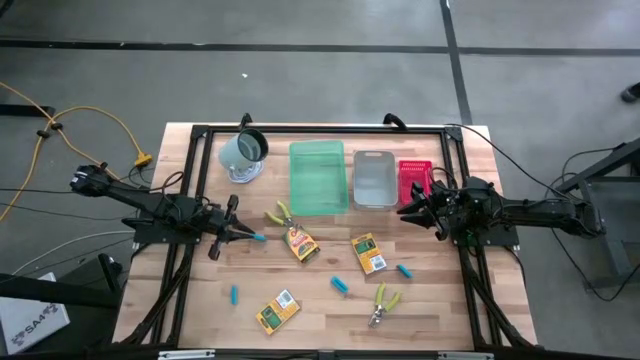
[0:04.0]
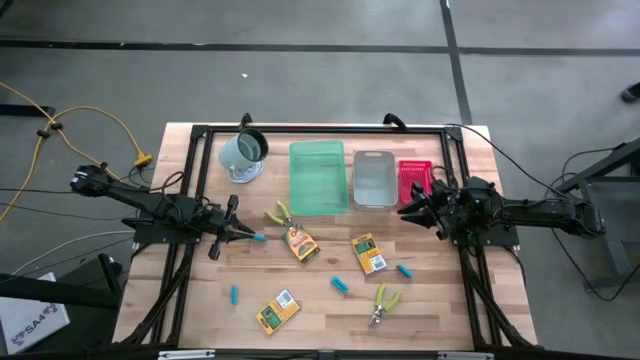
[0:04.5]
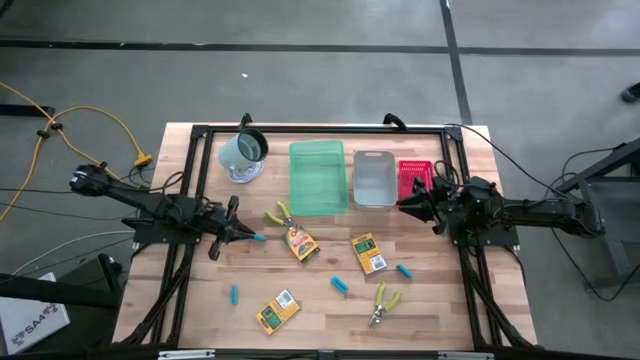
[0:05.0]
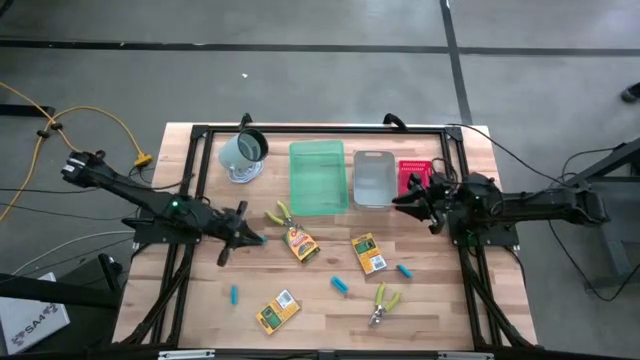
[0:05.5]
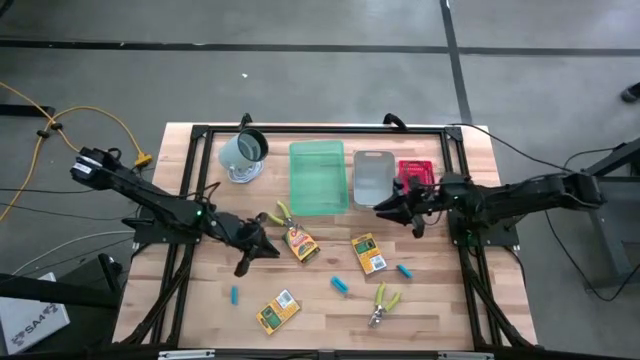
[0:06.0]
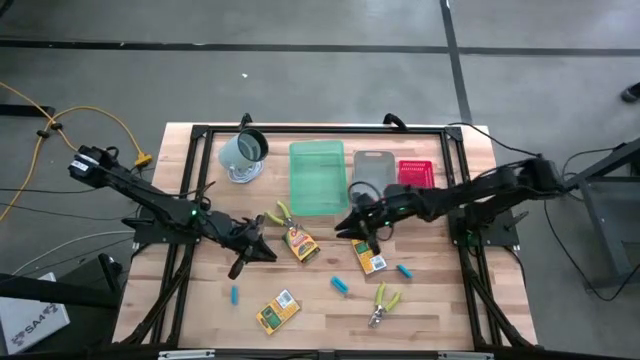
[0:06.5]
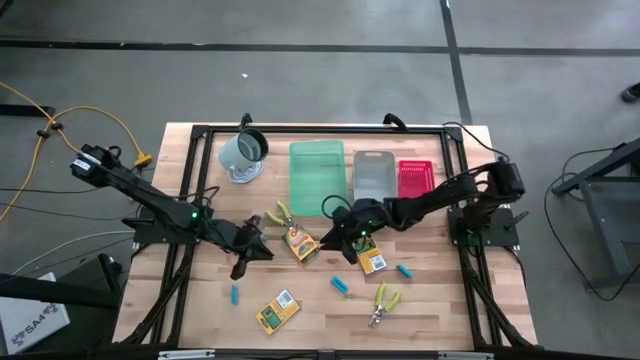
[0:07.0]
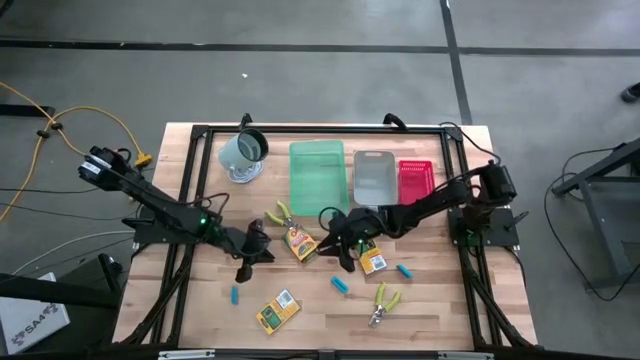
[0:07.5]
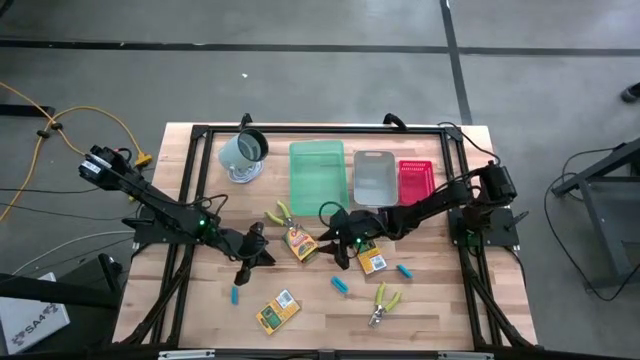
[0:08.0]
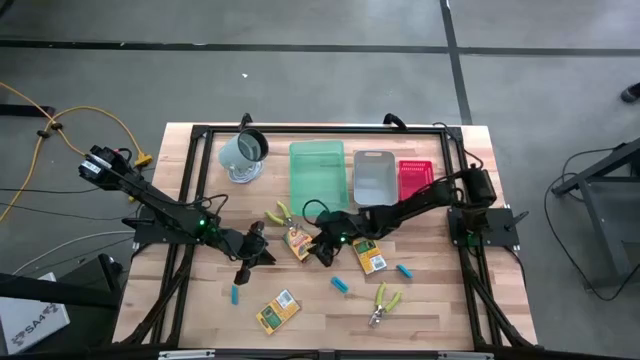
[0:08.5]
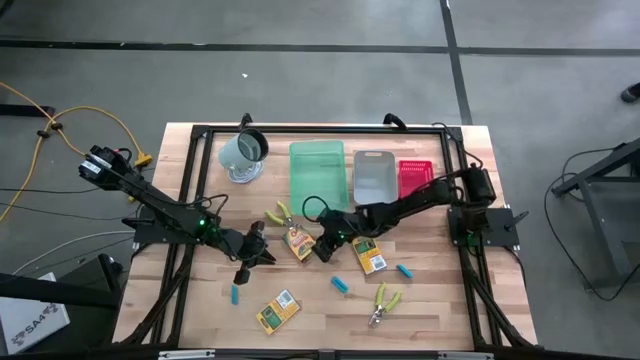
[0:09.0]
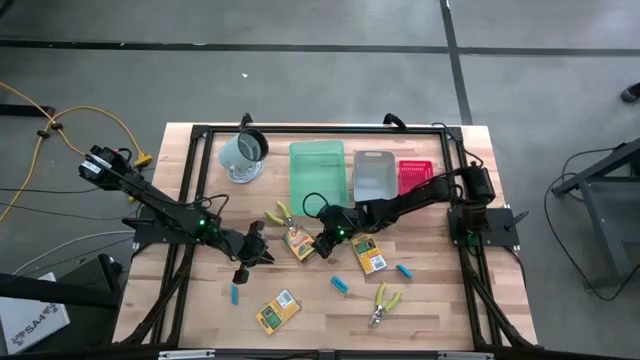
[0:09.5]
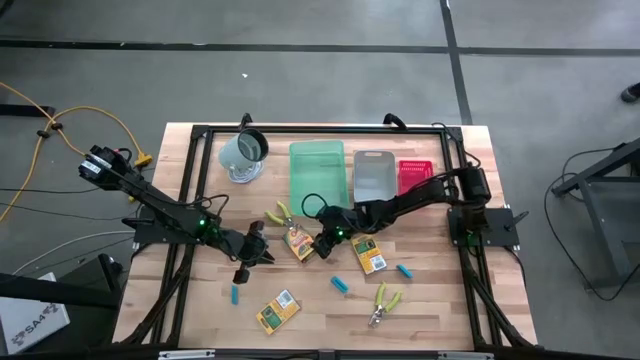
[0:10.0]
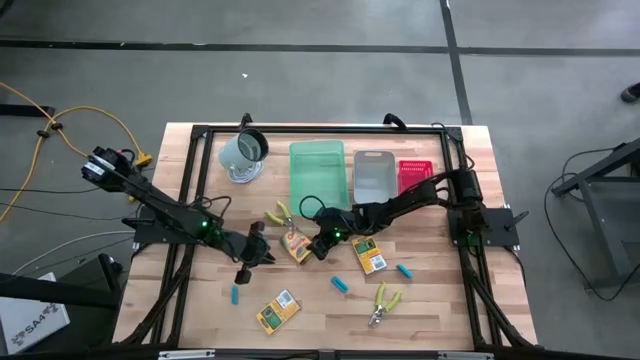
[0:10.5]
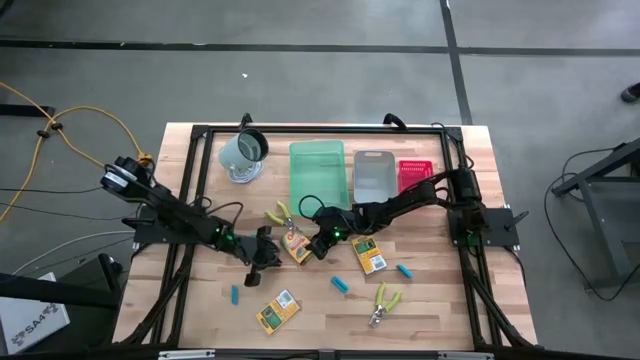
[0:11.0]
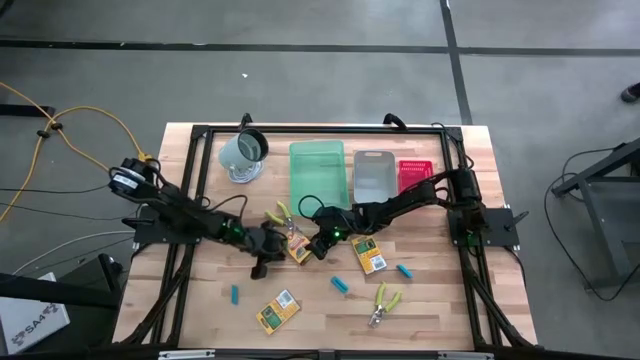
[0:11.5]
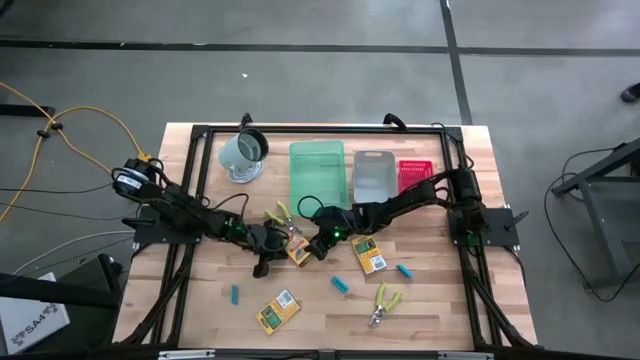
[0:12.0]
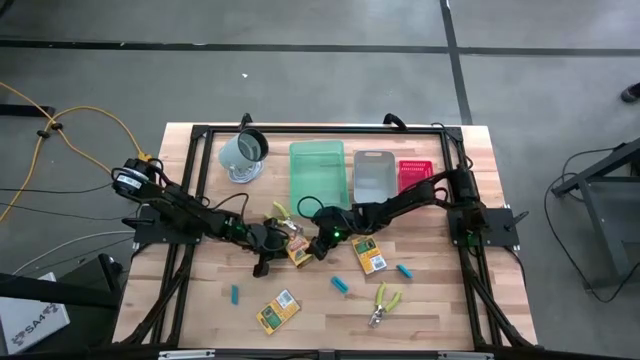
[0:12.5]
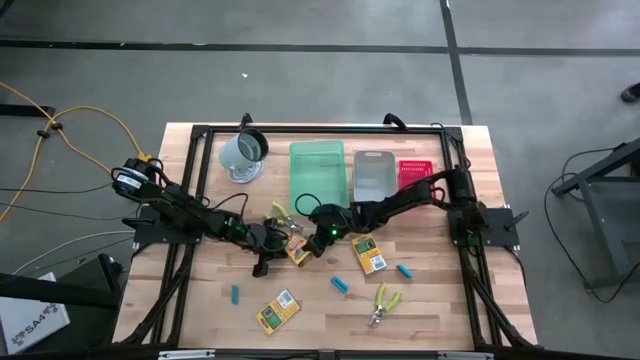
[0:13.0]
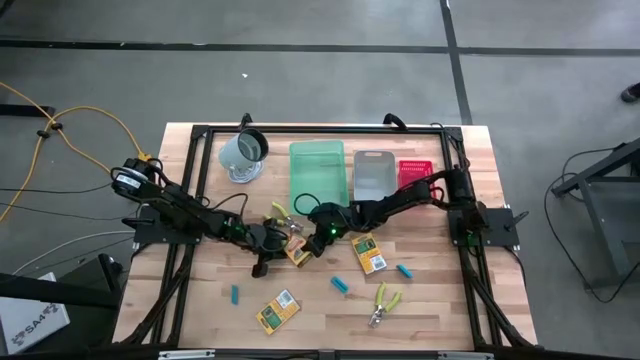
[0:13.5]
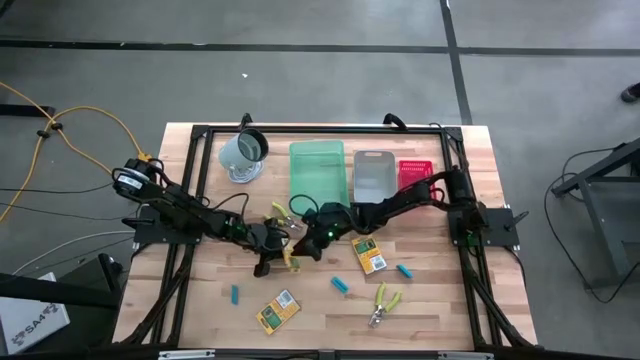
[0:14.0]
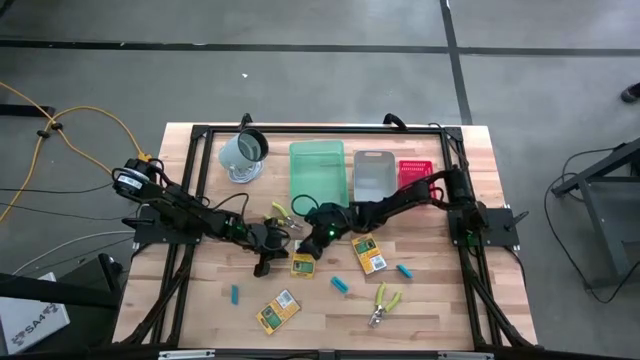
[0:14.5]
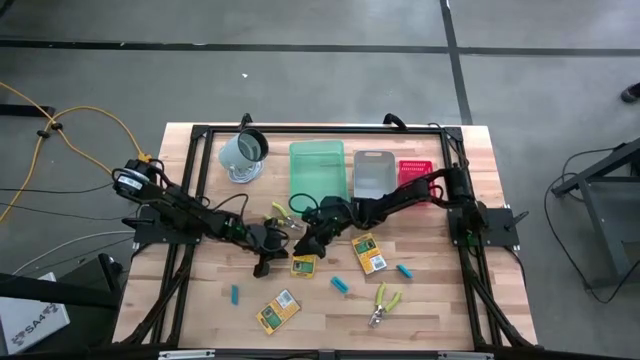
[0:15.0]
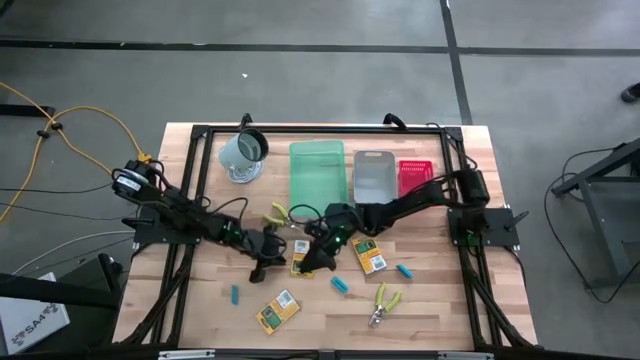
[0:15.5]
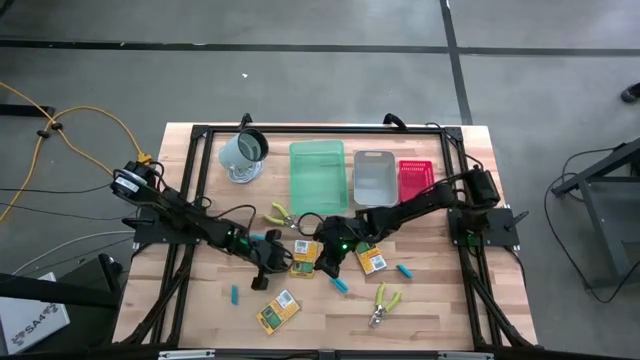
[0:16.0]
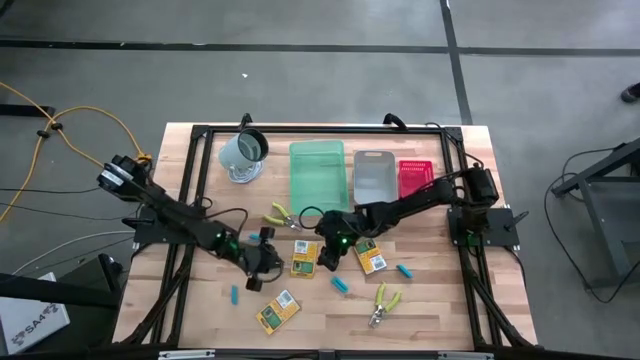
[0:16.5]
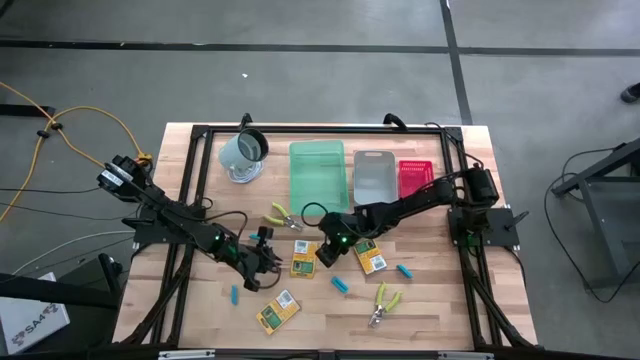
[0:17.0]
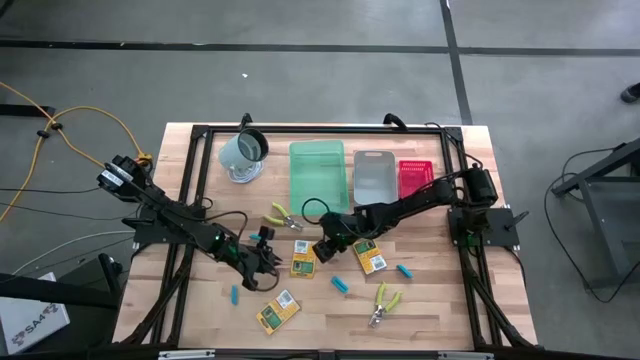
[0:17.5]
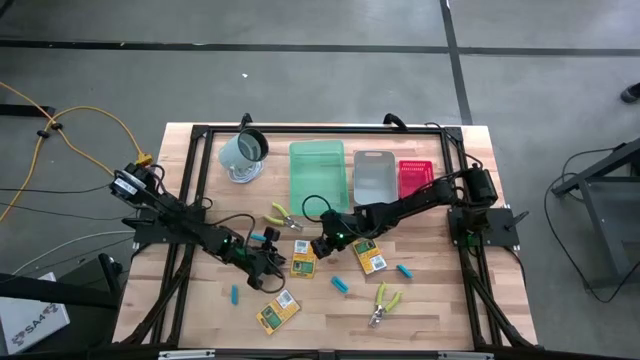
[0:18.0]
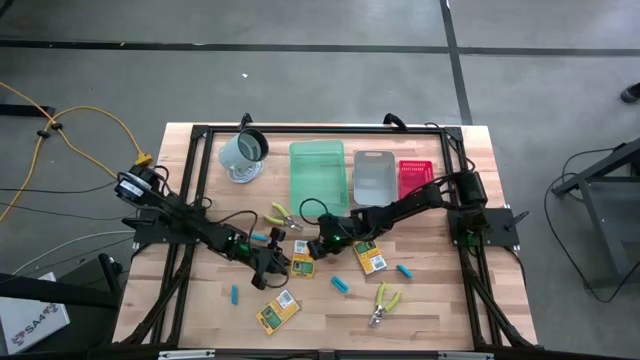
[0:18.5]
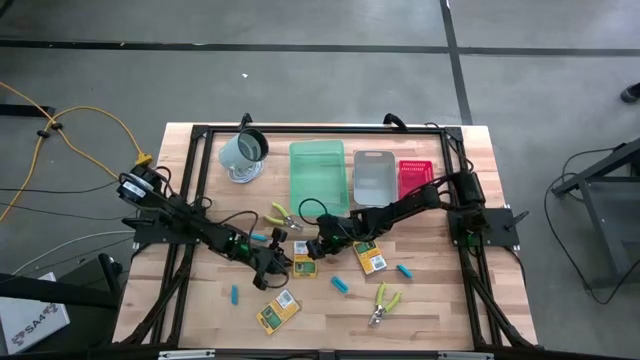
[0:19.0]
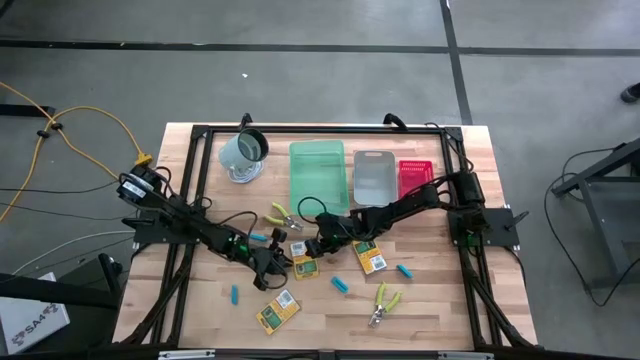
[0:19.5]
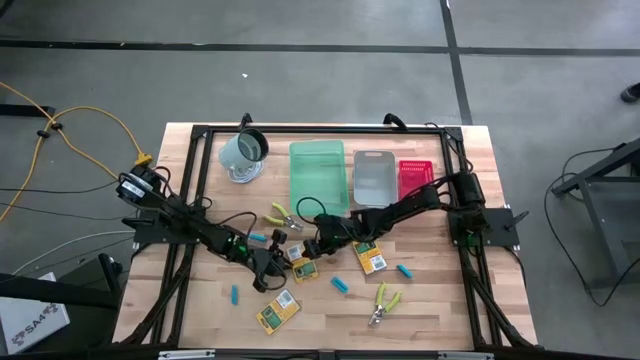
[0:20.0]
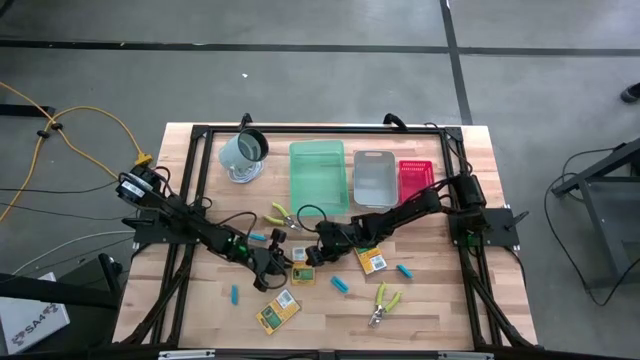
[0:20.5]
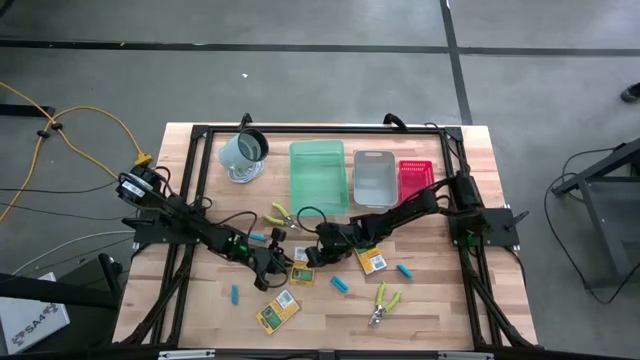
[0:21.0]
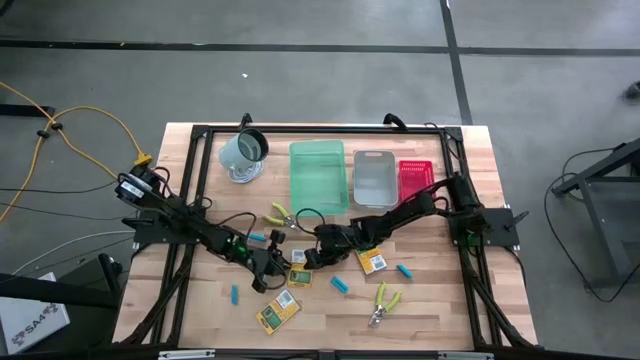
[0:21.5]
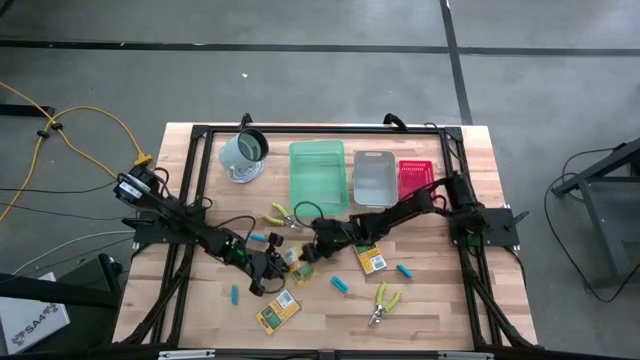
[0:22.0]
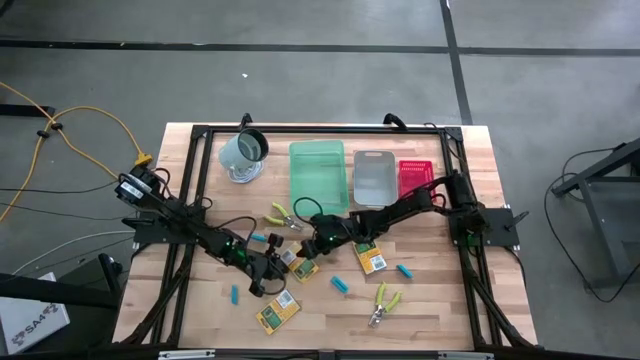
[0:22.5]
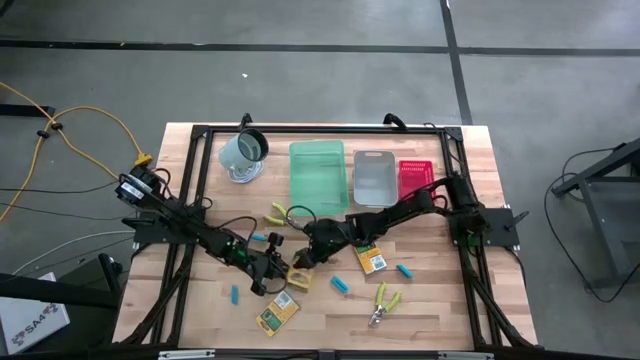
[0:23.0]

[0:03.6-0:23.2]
Task: Pick & Place School Supplies
Put the top left yellow crayon box into the green bin
